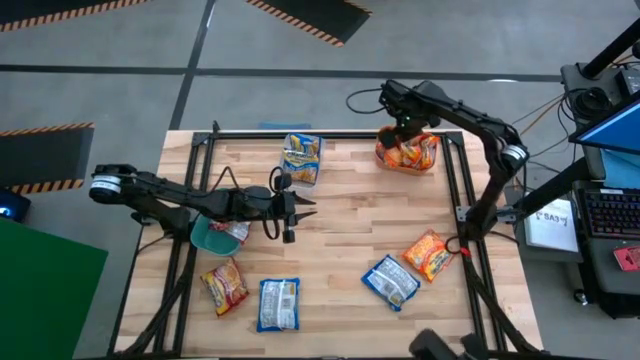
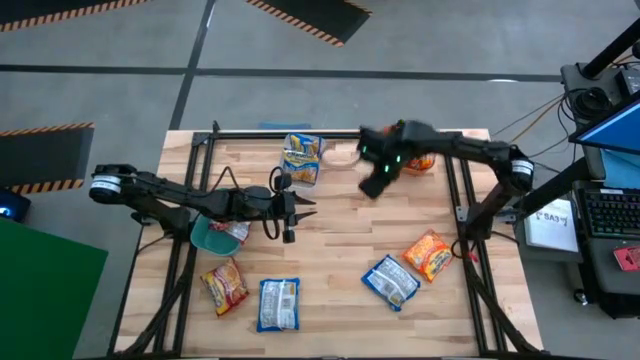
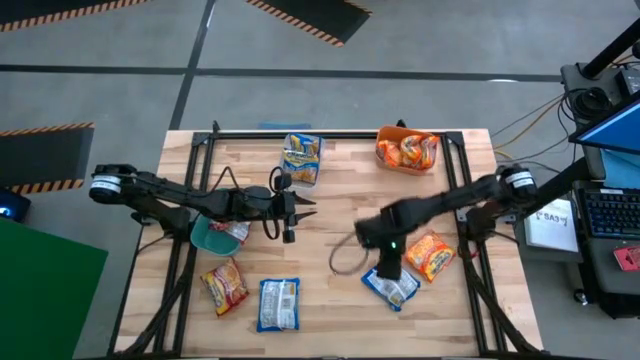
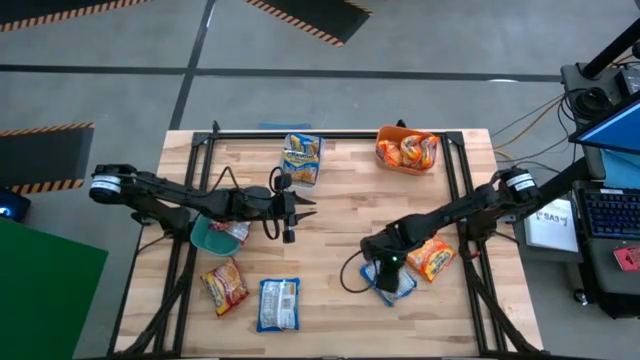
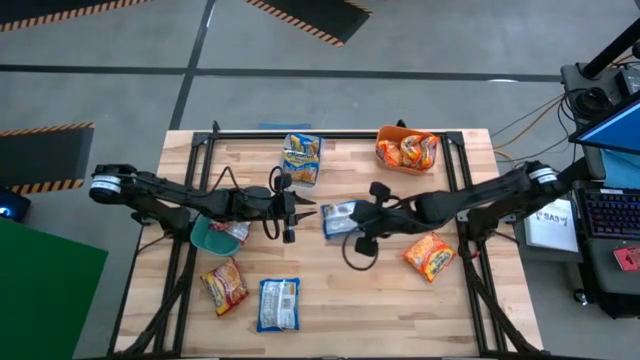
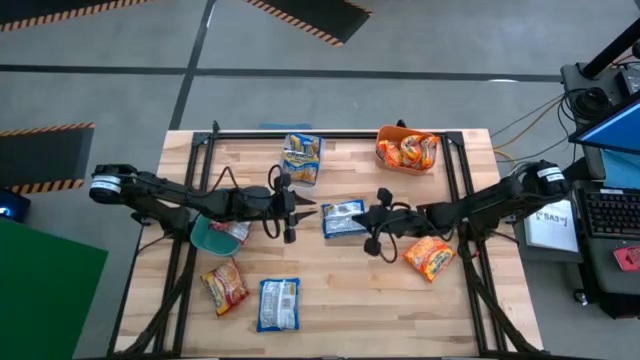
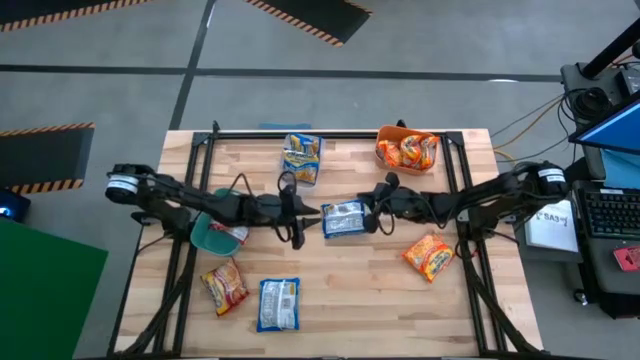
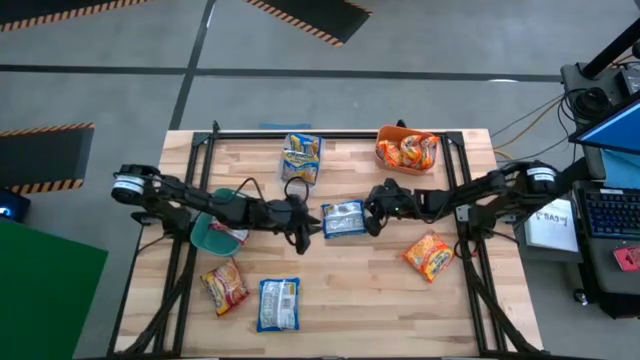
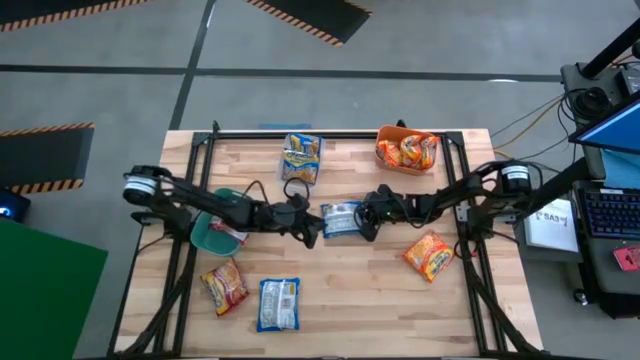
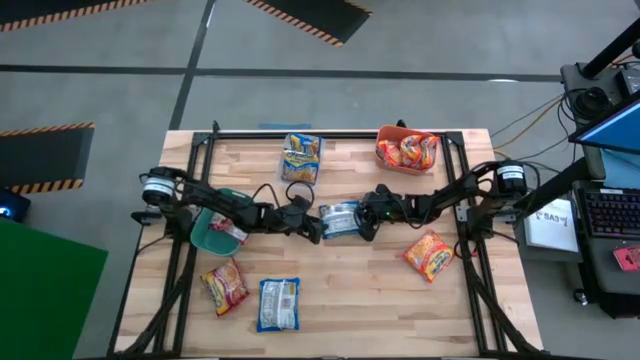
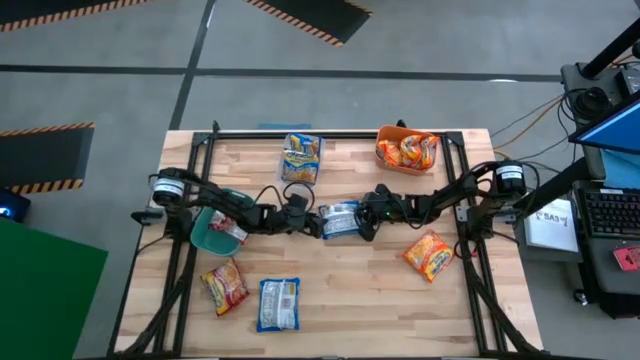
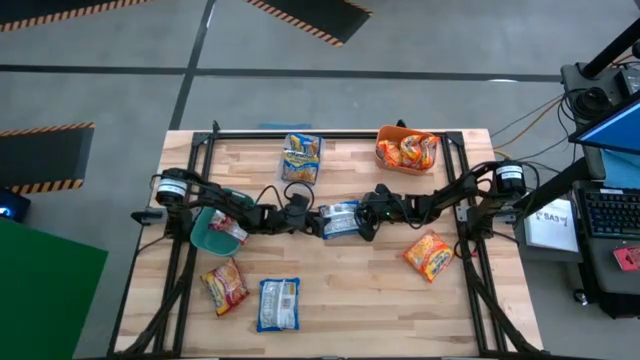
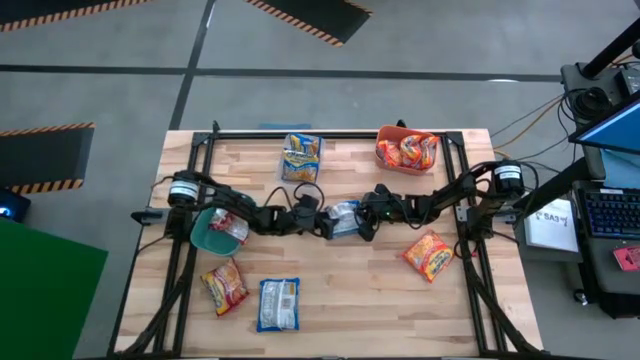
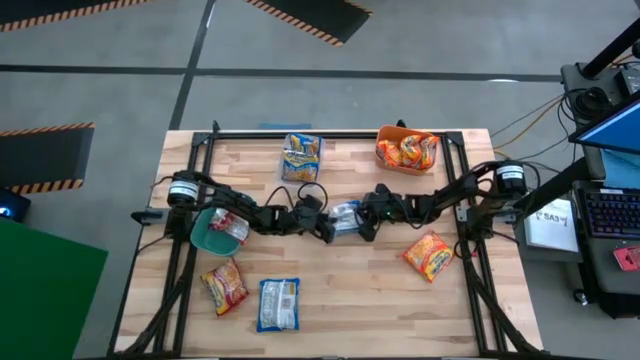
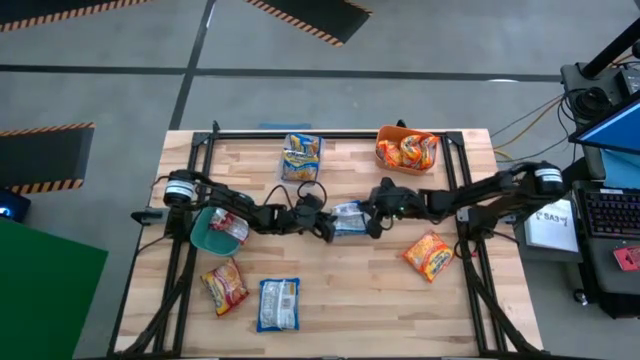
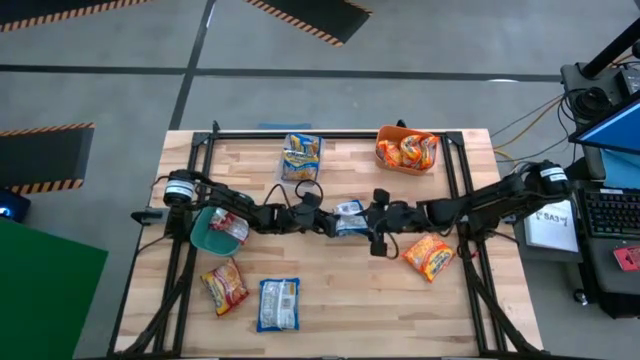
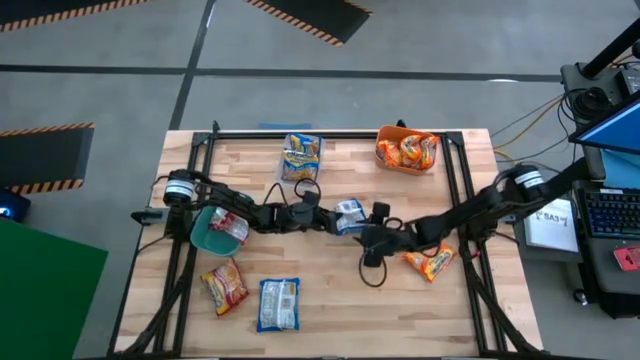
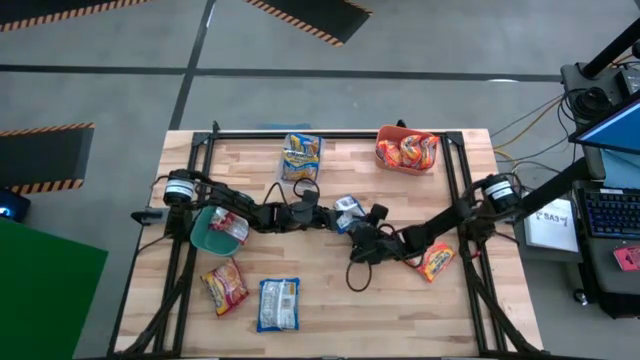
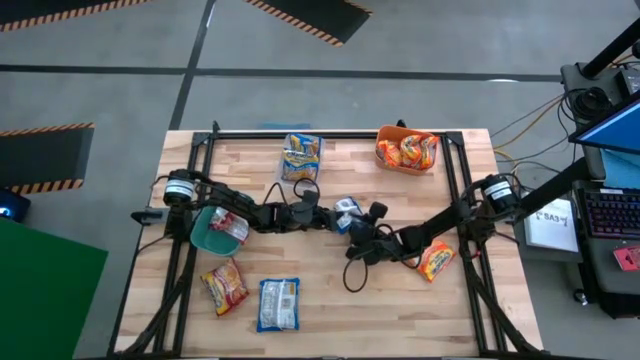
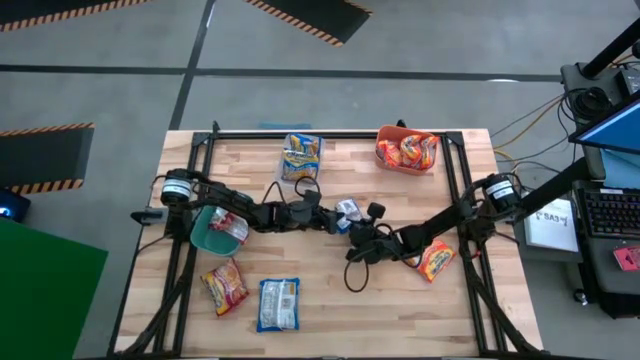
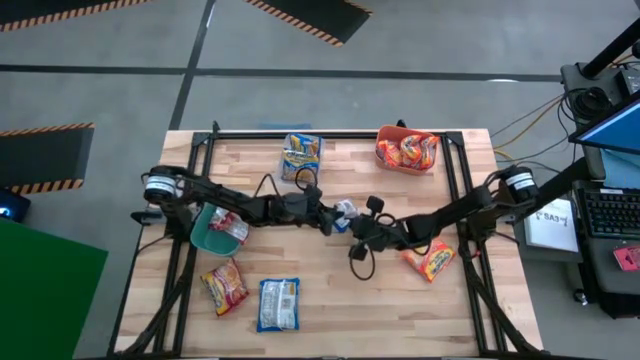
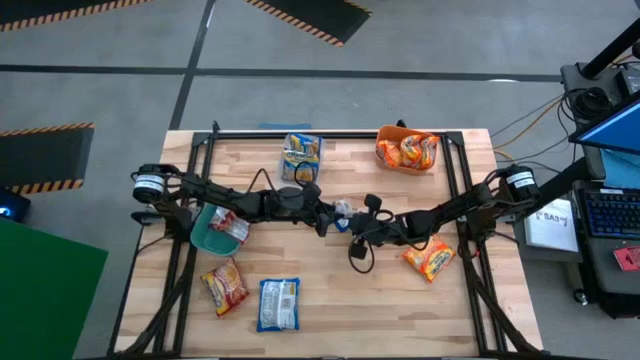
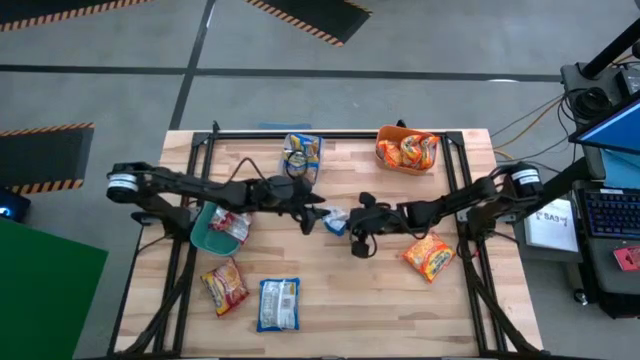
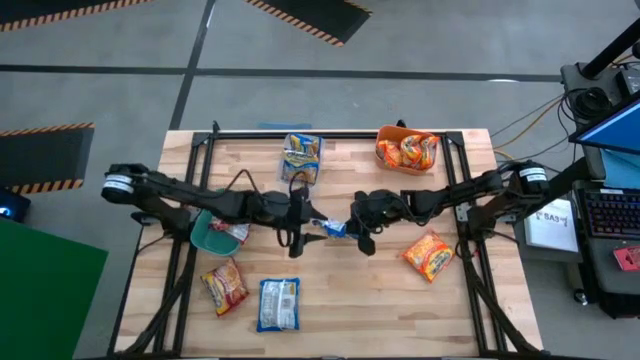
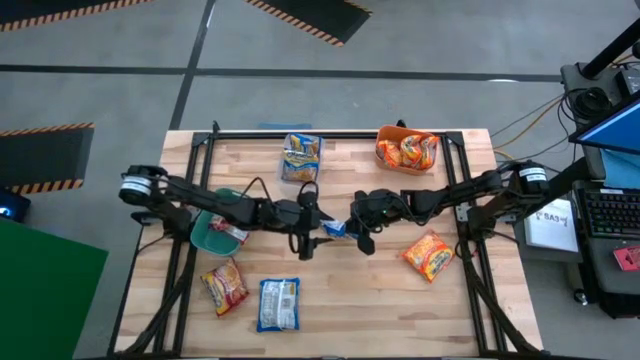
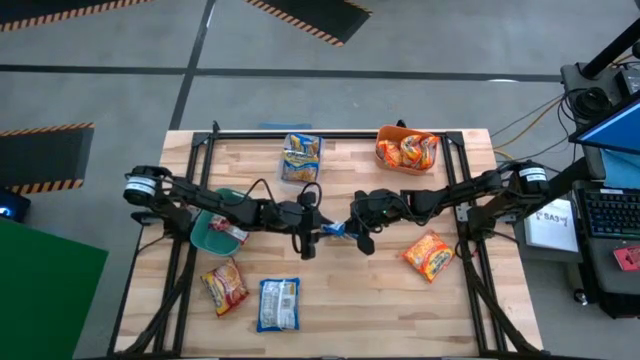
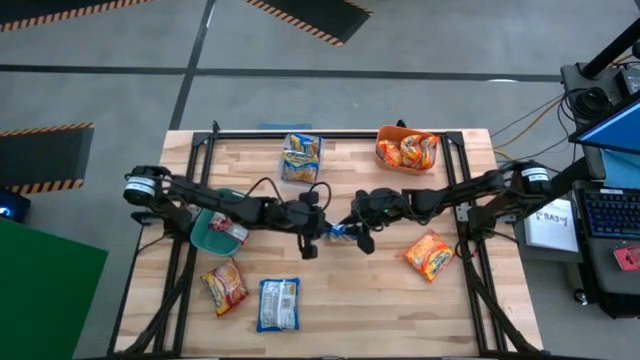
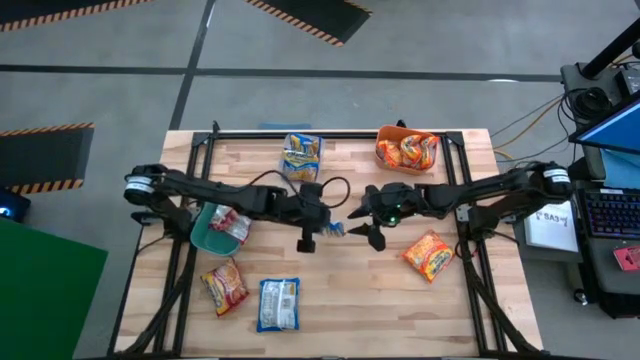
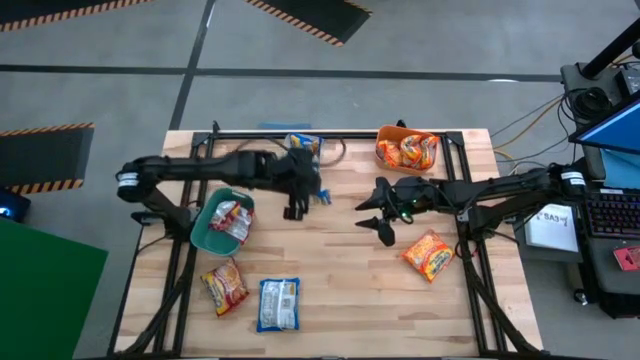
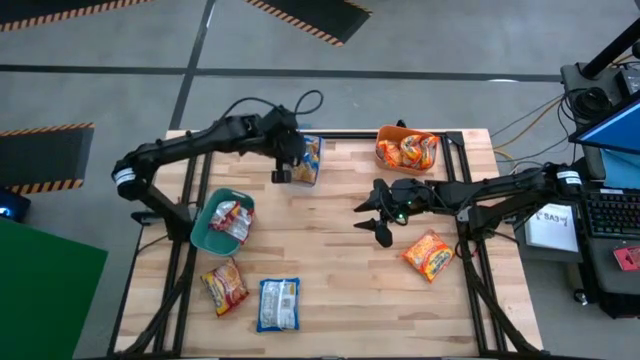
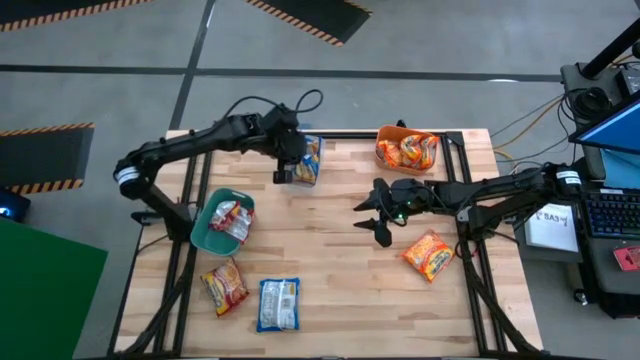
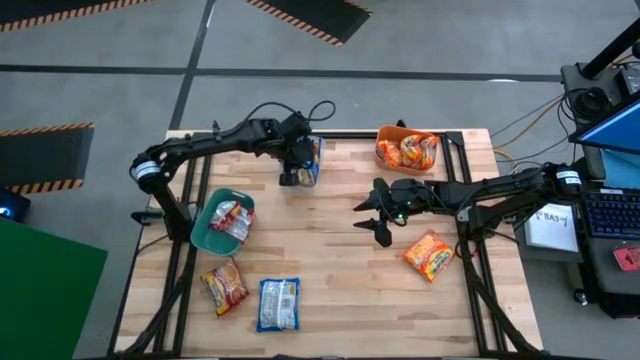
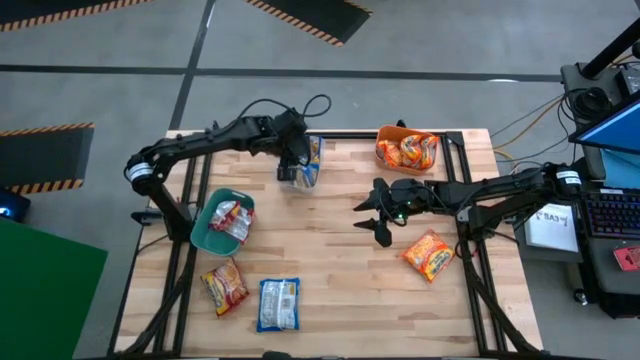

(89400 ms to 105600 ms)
Task: Sort Maruchan noodles
Put the blue noodle pack into the transparent bin

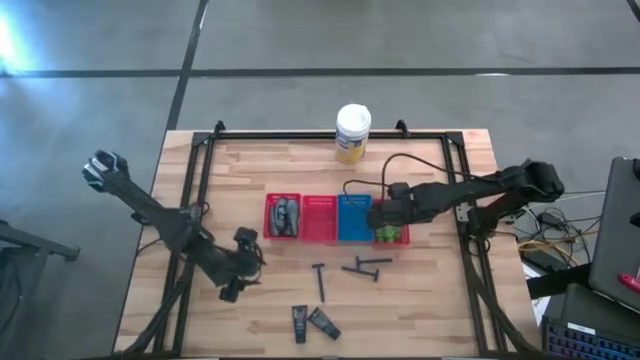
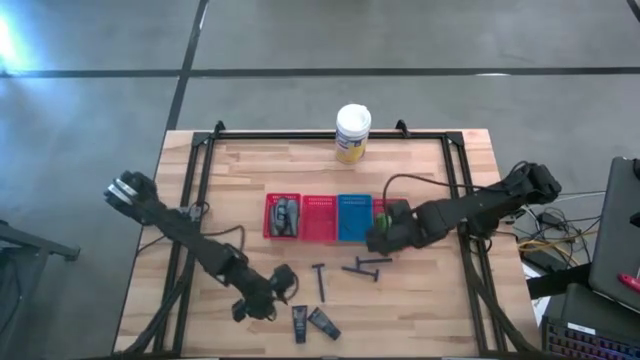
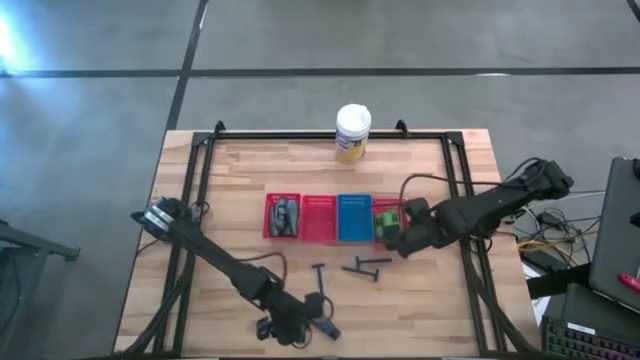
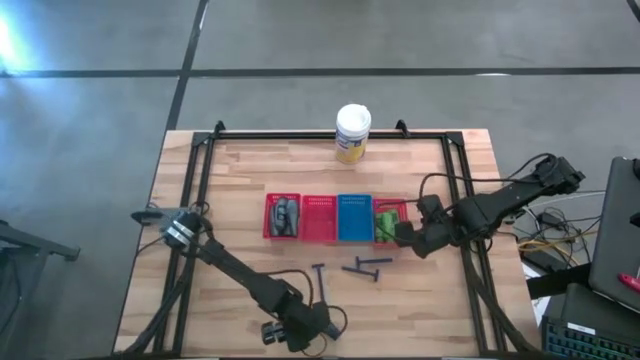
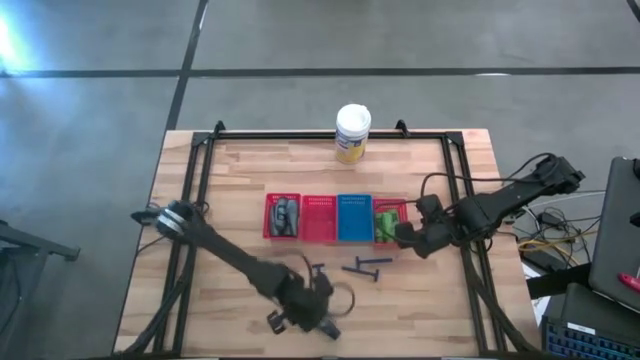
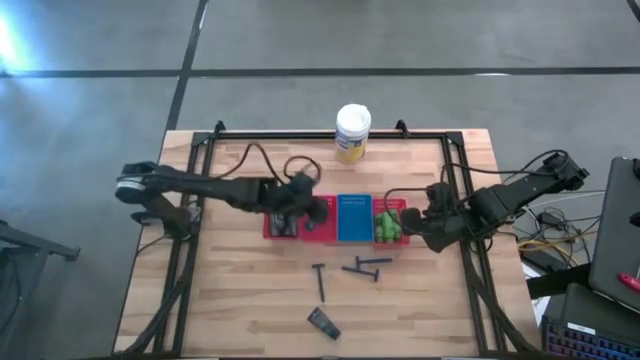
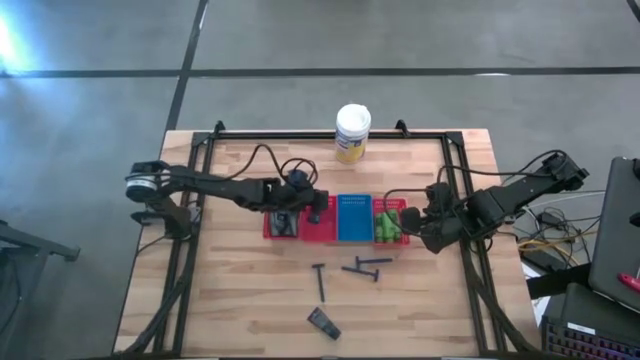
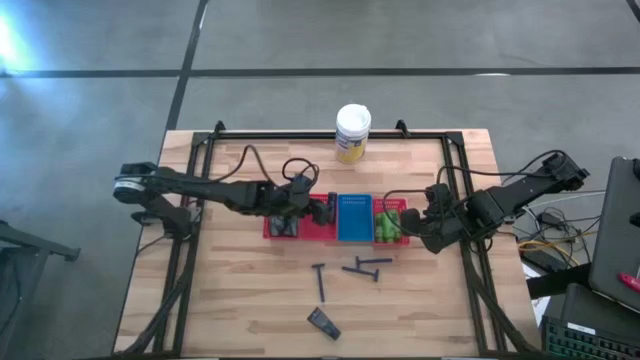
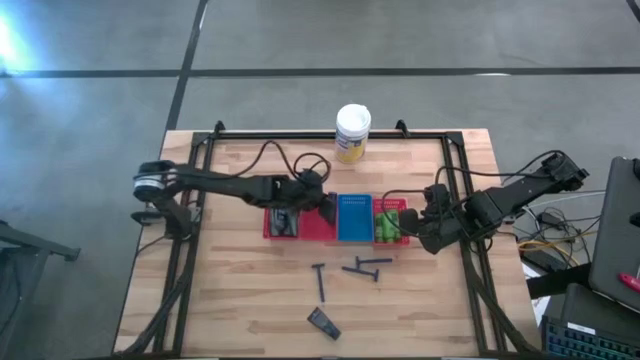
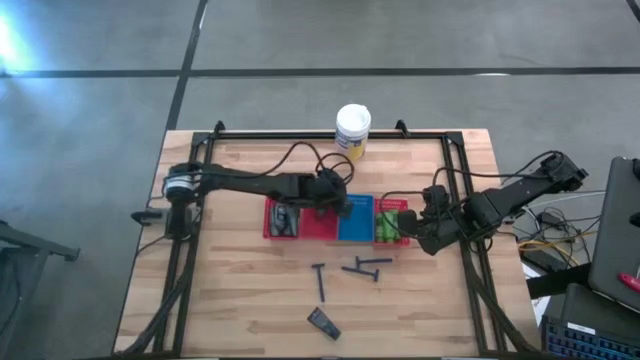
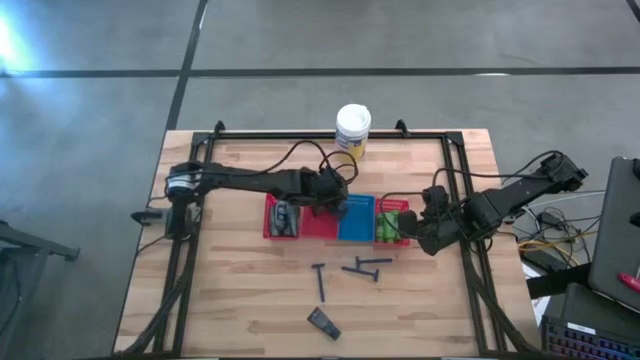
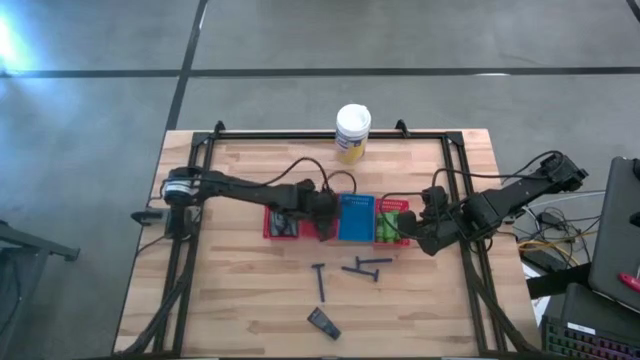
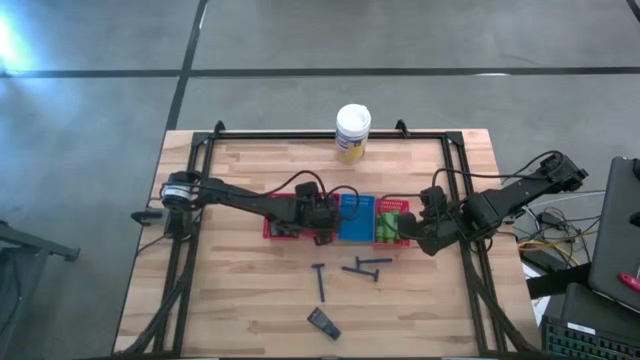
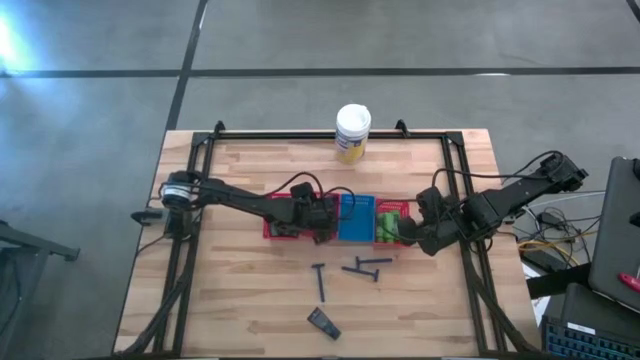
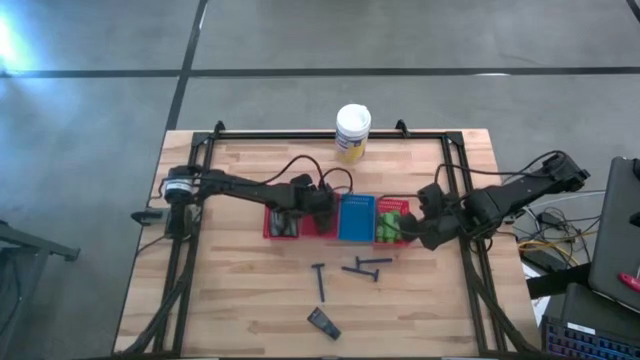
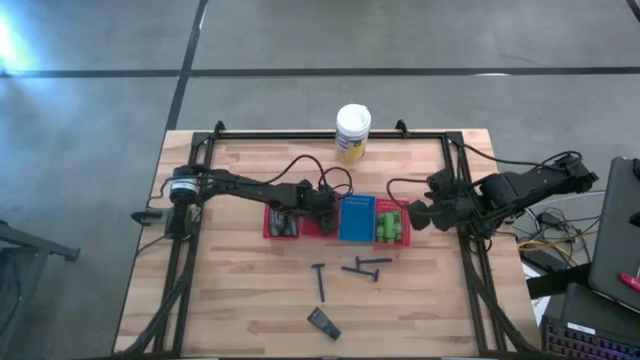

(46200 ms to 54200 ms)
Task: Pick & Place Travel size toiletries
Put the blue shave cream into the middle red bin
